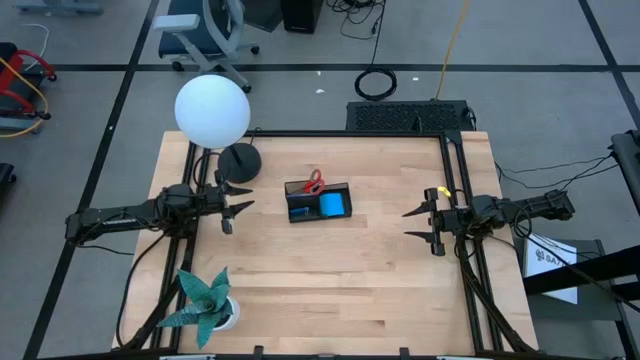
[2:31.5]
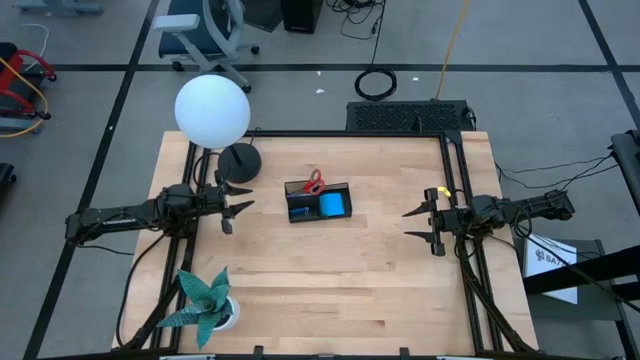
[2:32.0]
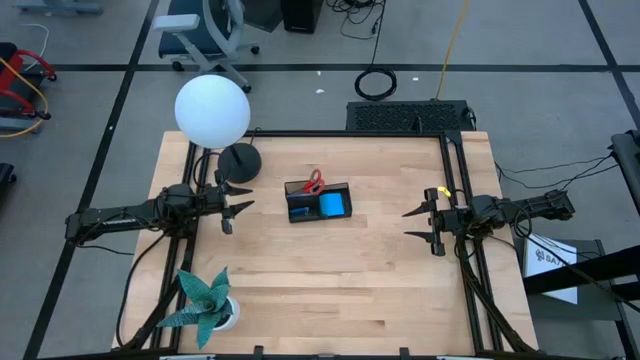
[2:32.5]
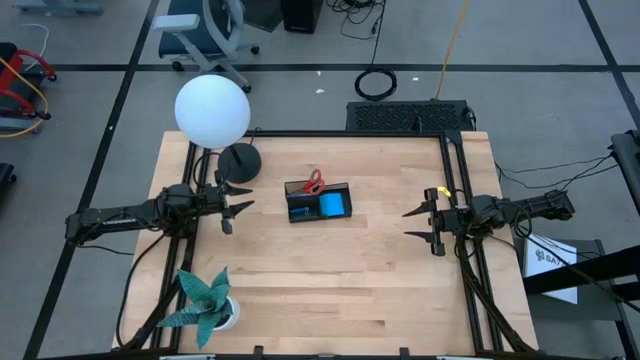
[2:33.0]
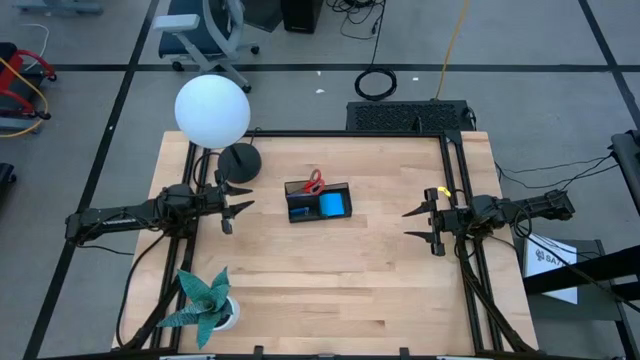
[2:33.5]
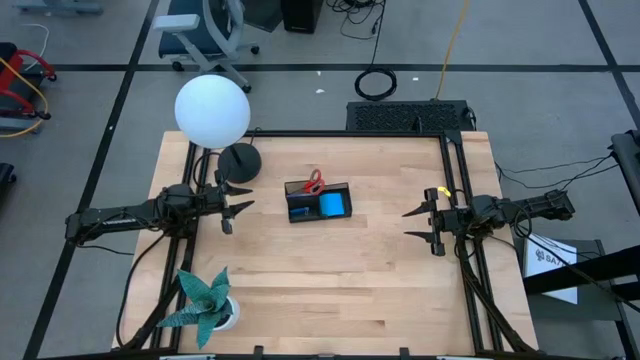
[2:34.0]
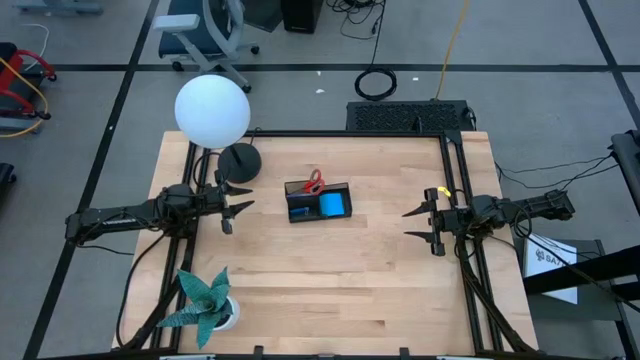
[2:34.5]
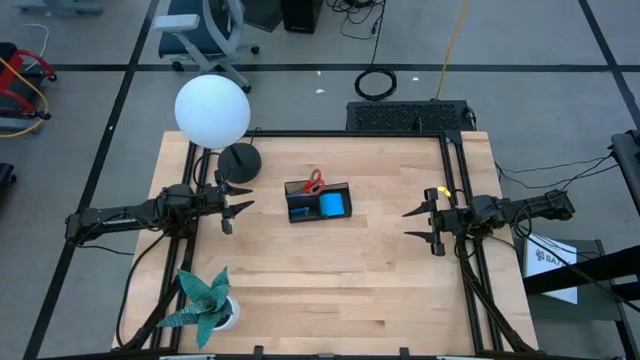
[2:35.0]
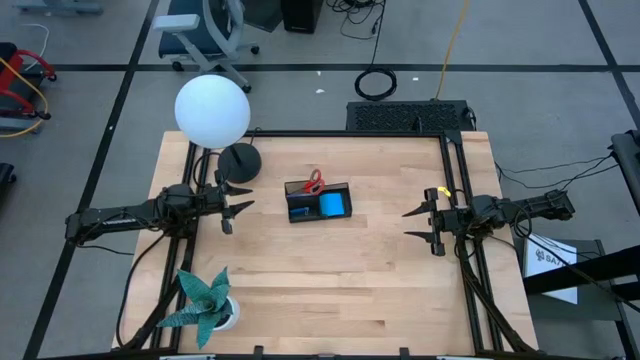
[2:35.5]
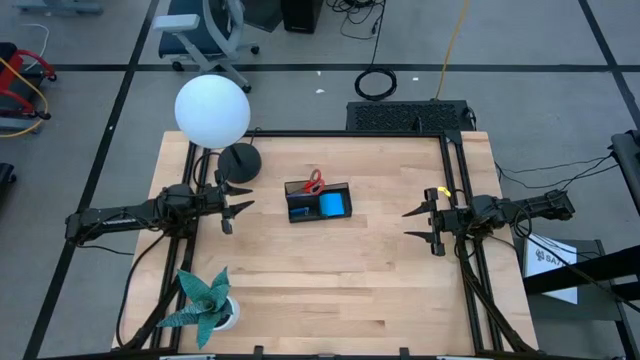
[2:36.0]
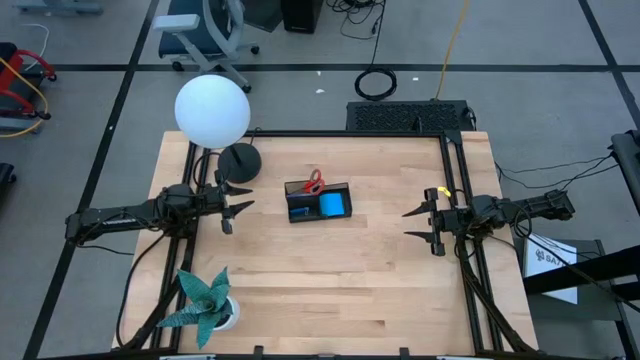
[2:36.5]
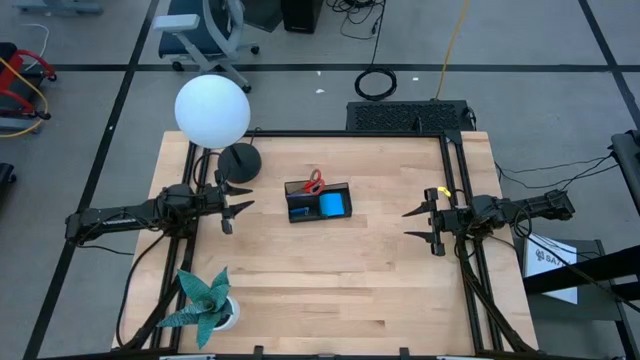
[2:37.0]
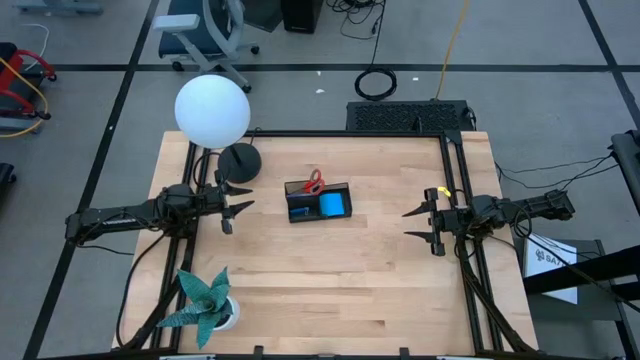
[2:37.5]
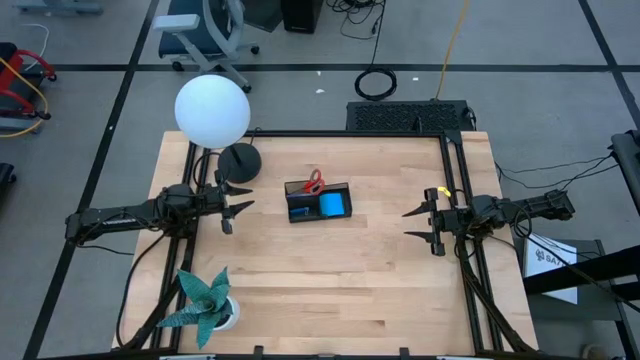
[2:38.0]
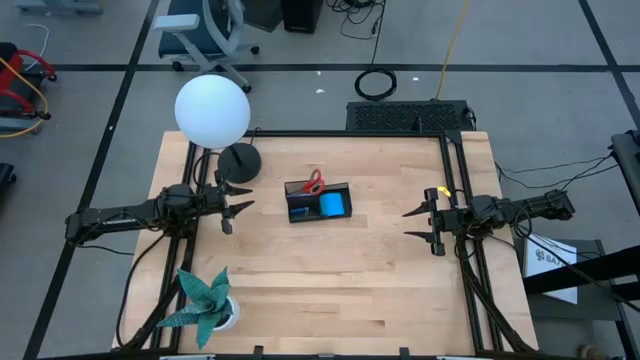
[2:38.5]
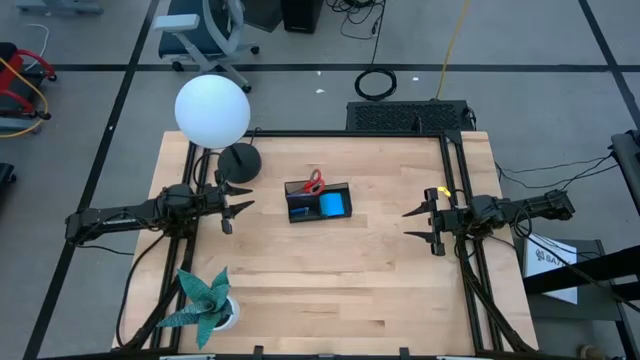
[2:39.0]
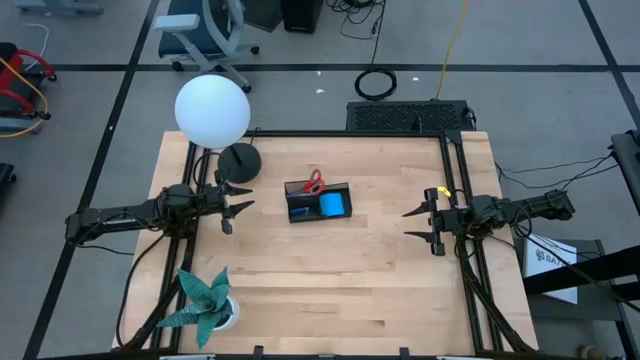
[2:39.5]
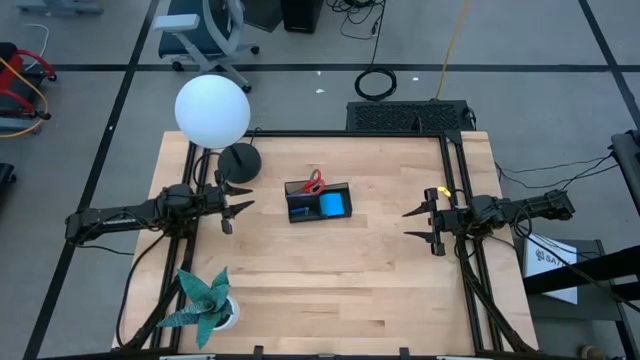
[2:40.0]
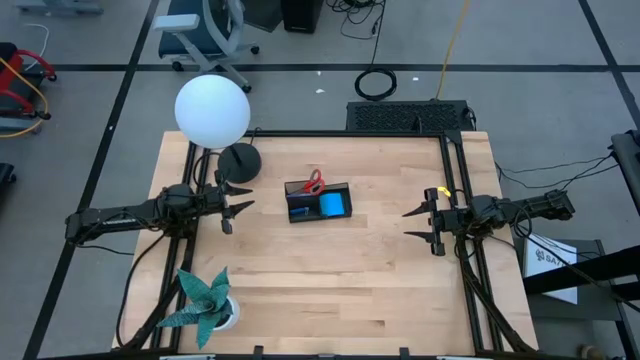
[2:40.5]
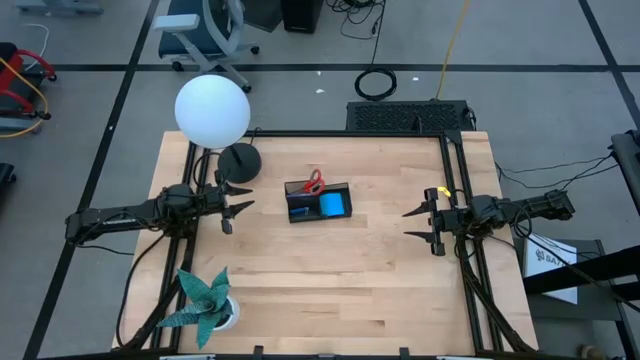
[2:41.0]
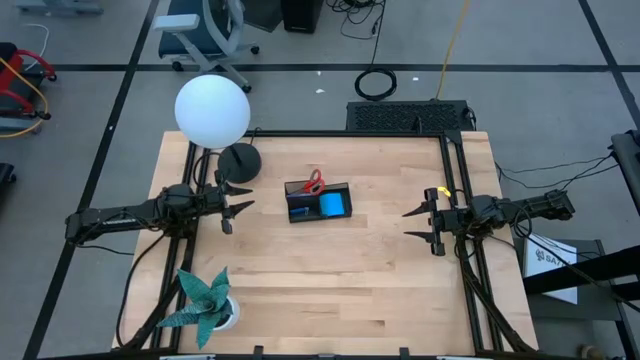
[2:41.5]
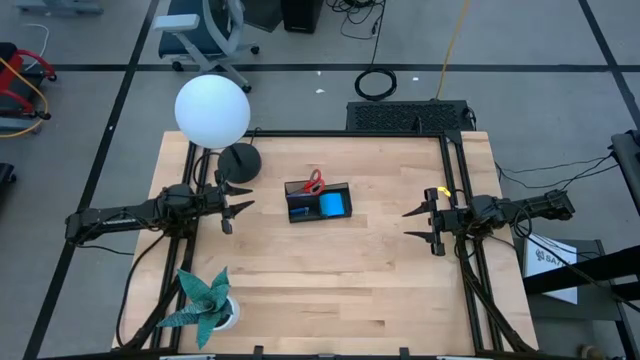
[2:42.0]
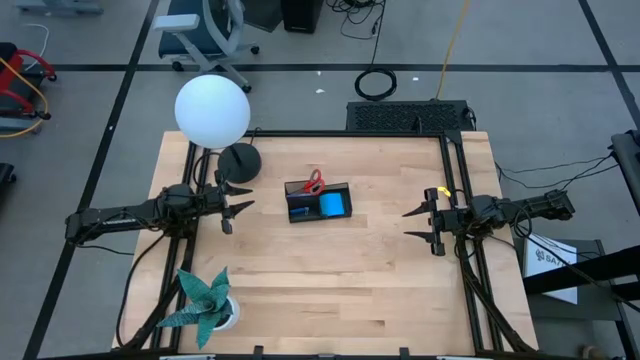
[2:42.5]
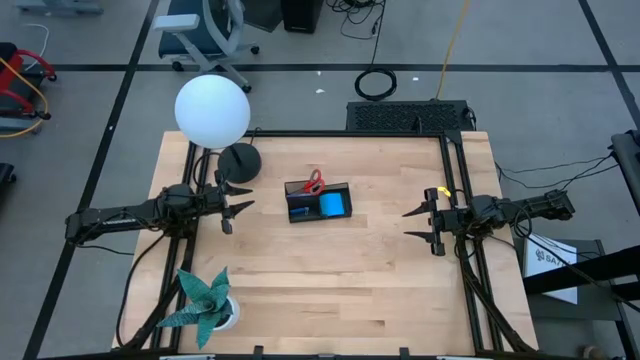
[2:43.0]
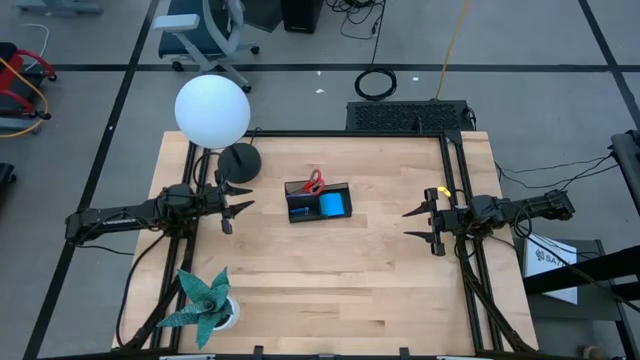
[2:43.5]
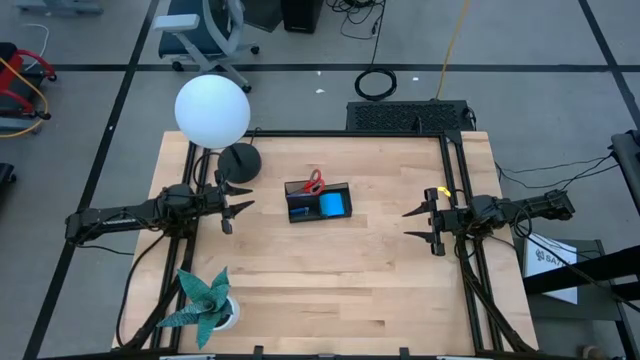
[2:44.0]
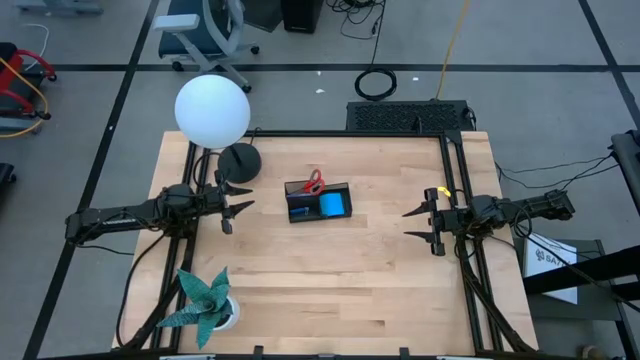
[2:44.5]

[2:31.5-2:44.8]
Task: Pick and place office supplies into organizer
Return to Home Position

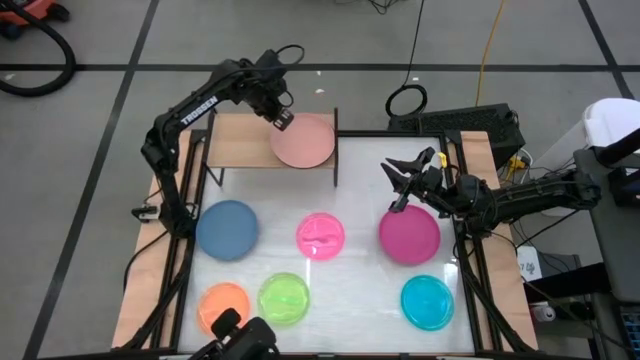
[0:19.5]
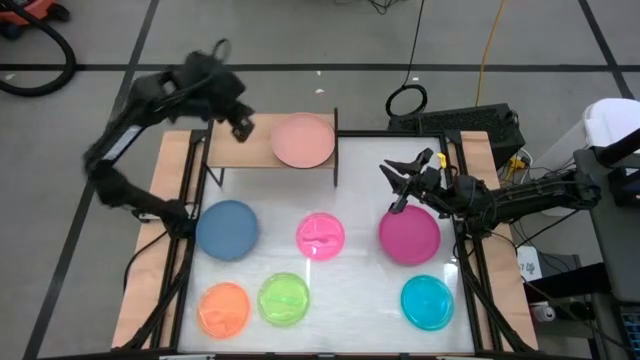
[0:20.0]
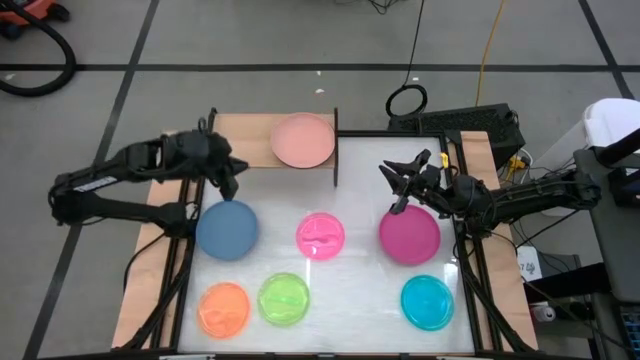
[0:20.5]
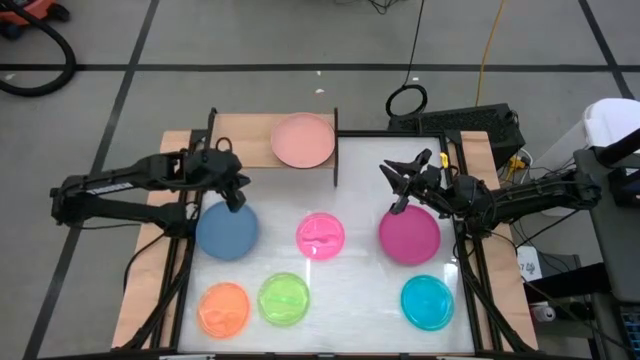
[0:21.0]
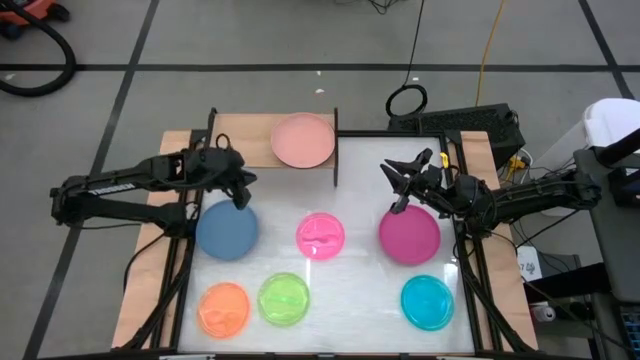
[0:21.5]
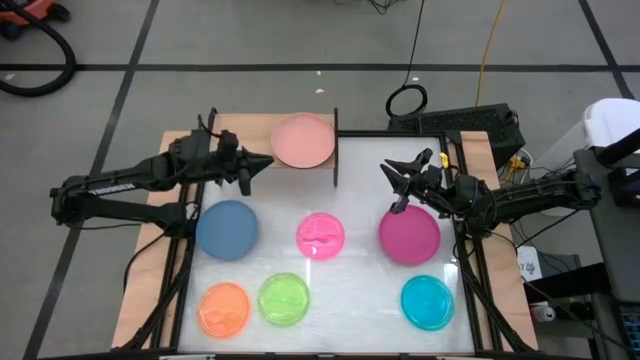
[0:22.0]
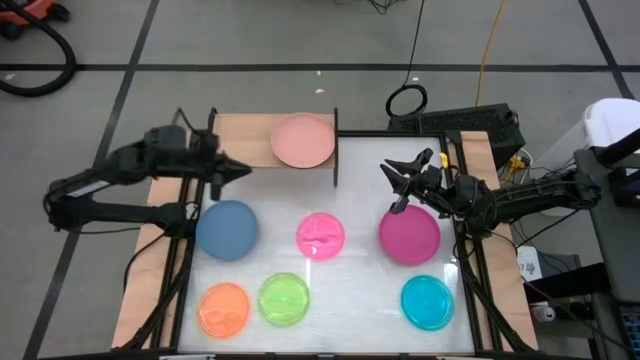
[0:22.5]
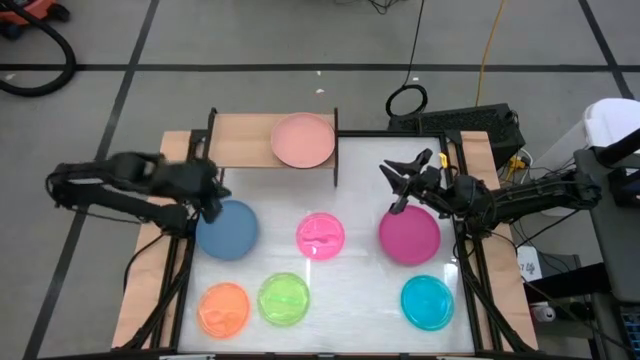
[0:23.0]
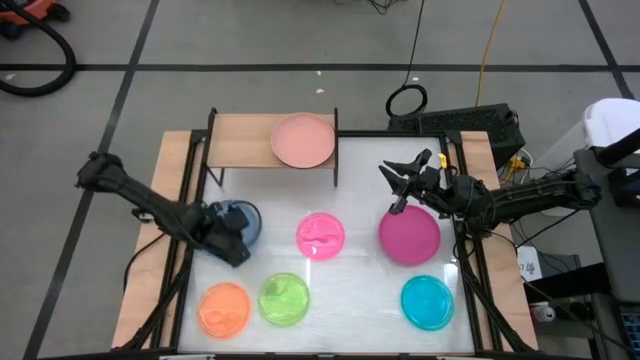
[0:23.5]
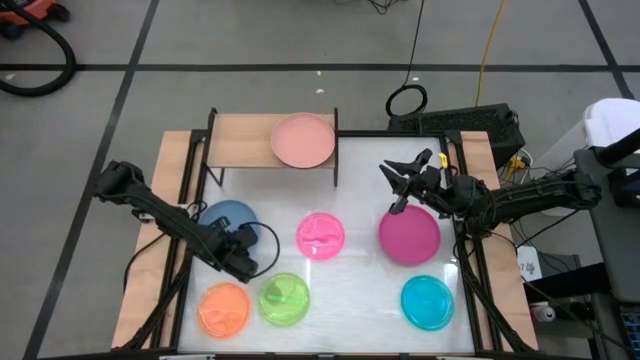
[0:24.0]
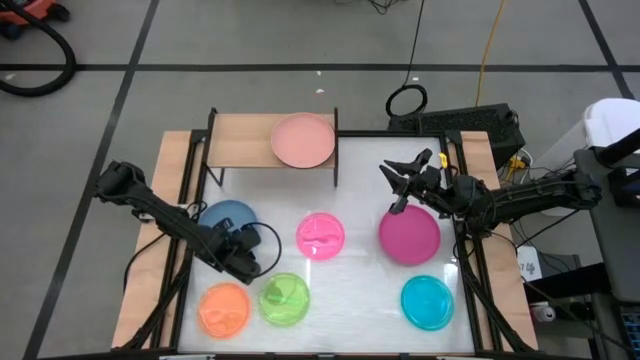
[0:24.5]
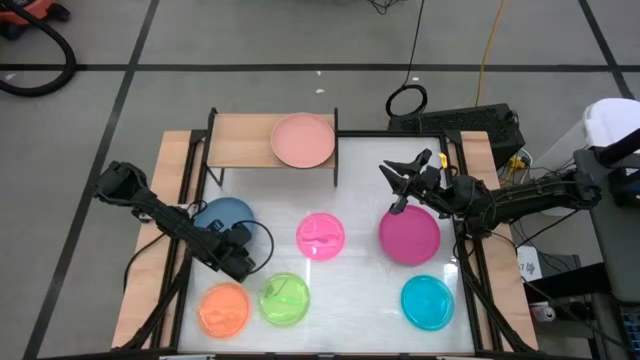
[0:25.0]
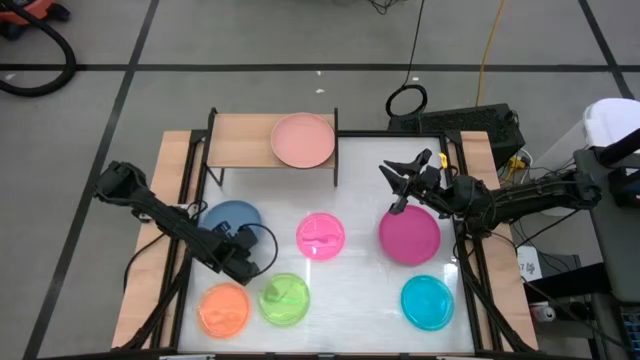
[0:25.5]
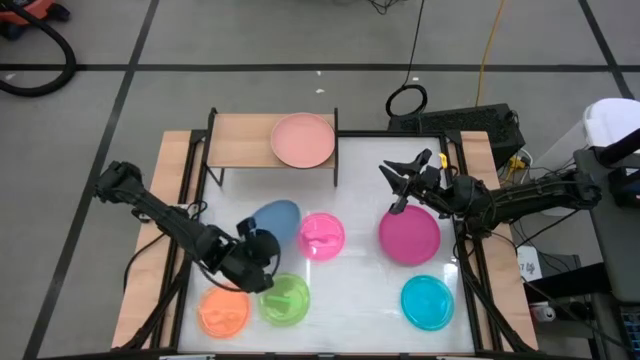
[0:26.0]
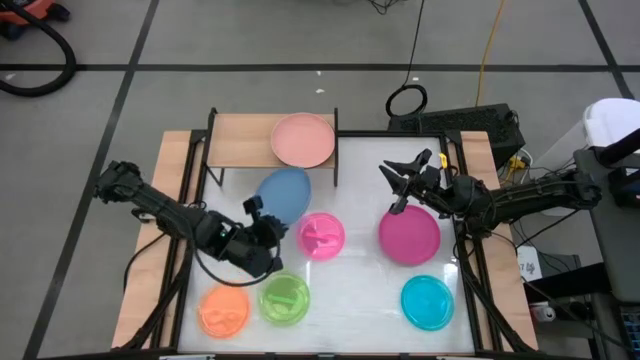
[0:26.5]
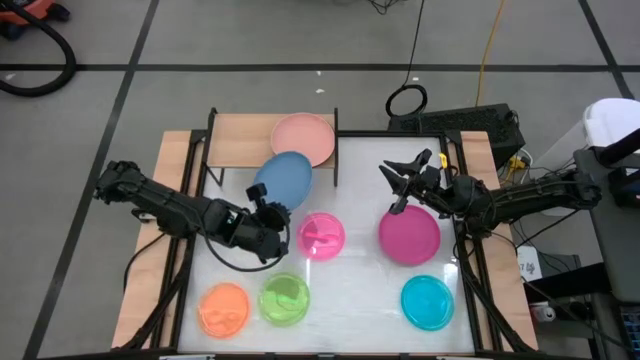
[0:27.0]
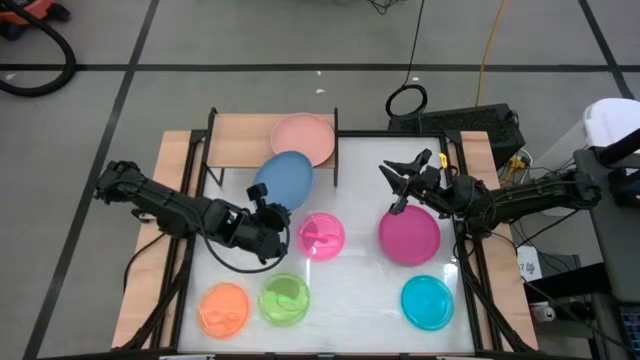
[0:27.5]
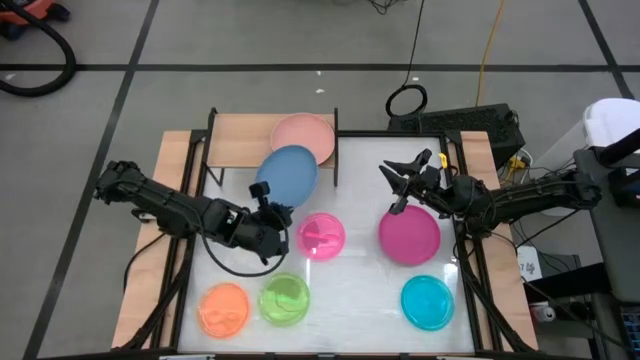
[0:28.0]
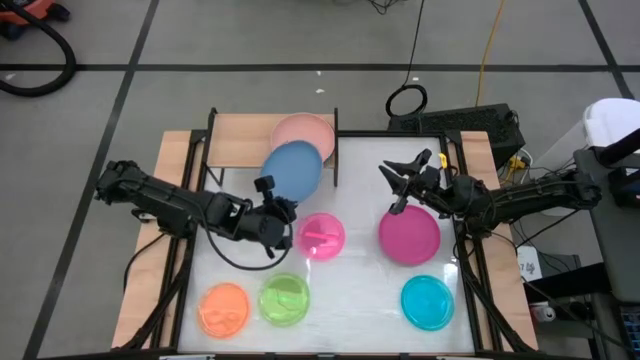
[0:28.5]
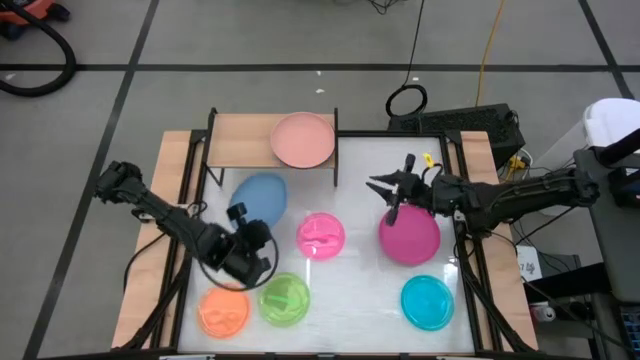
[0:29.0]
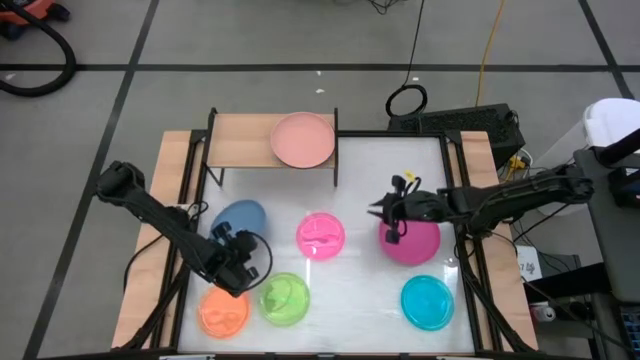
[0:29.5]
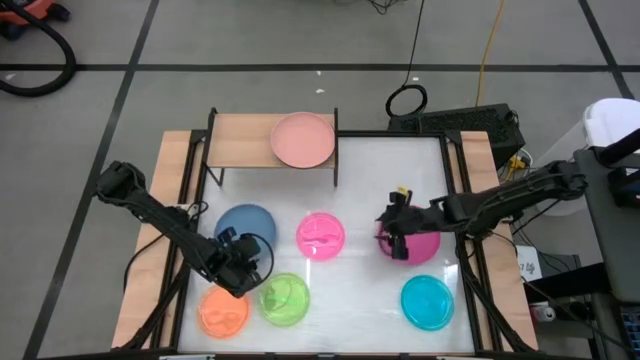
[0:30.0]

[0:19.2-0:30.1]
Task: Place and stack plates onto a shelf
Stack the light blue plate on top of the peach plate on the shelf
